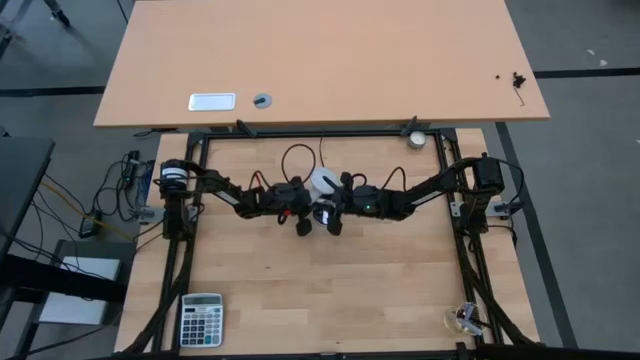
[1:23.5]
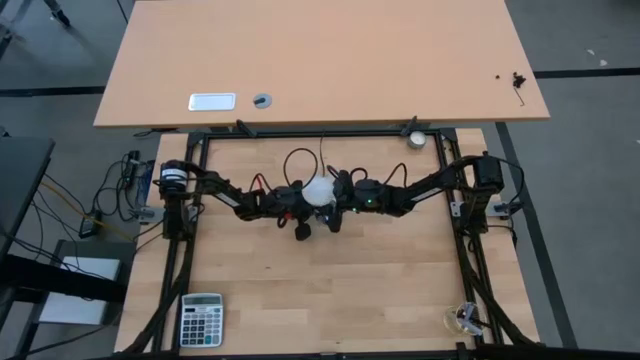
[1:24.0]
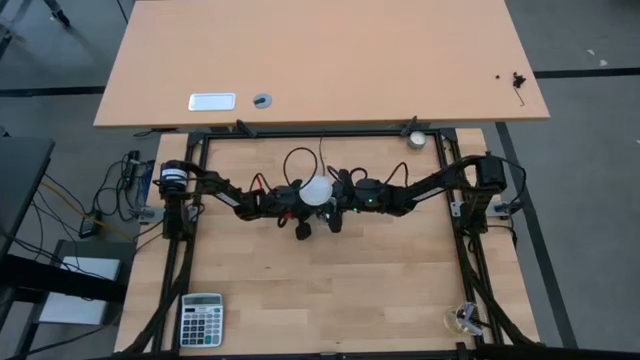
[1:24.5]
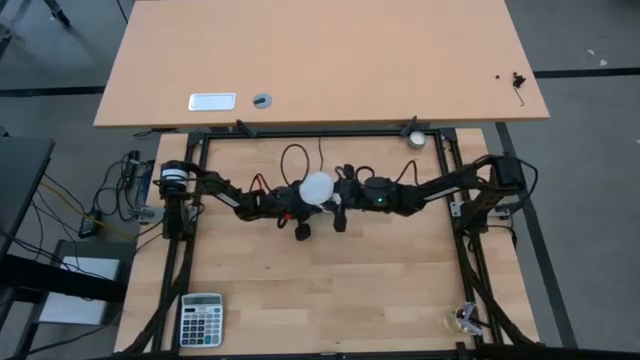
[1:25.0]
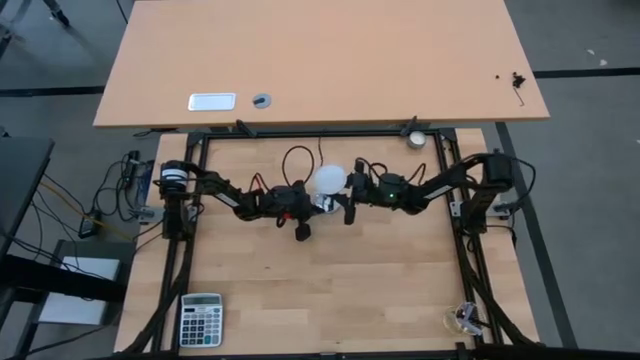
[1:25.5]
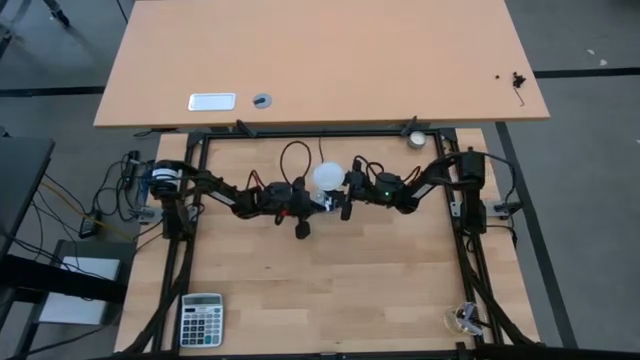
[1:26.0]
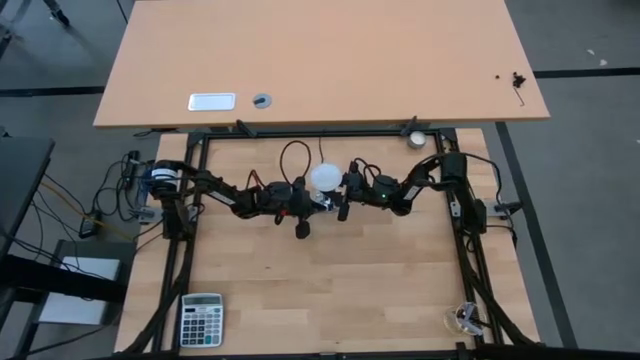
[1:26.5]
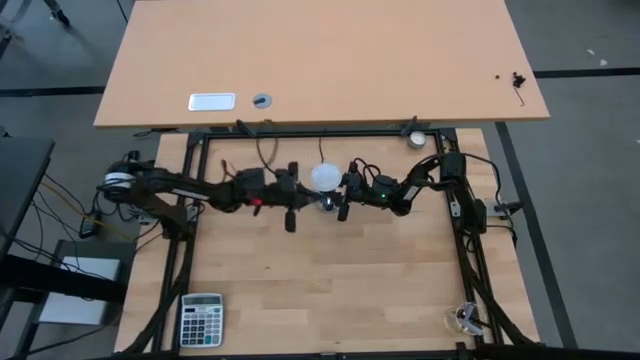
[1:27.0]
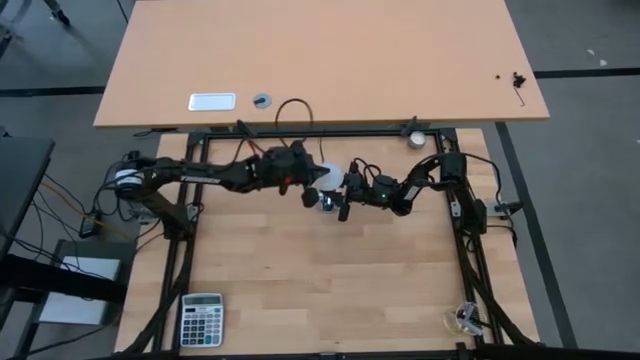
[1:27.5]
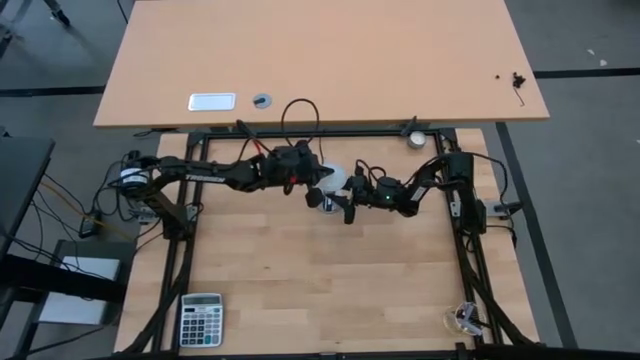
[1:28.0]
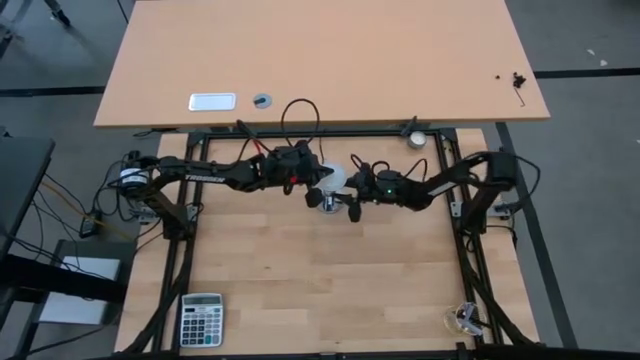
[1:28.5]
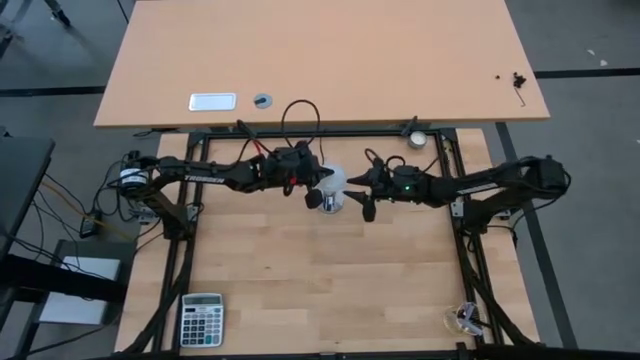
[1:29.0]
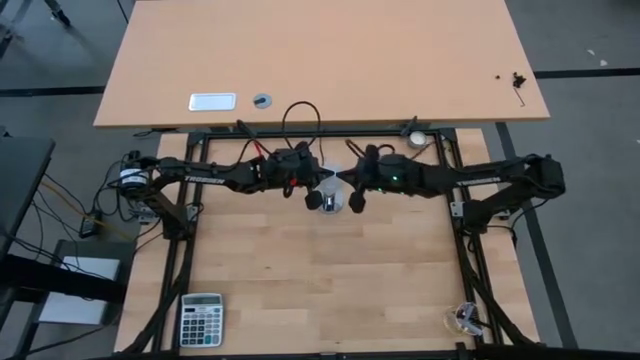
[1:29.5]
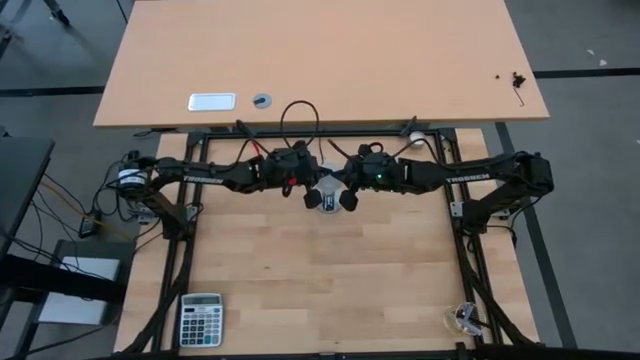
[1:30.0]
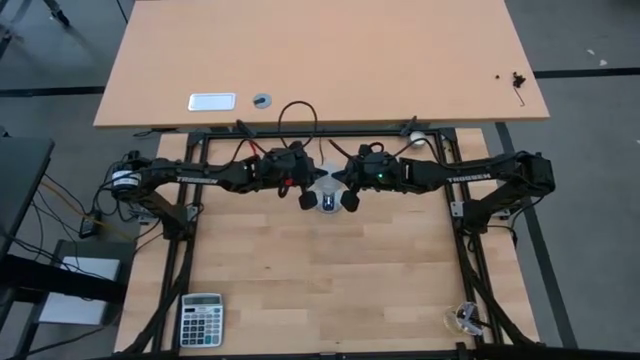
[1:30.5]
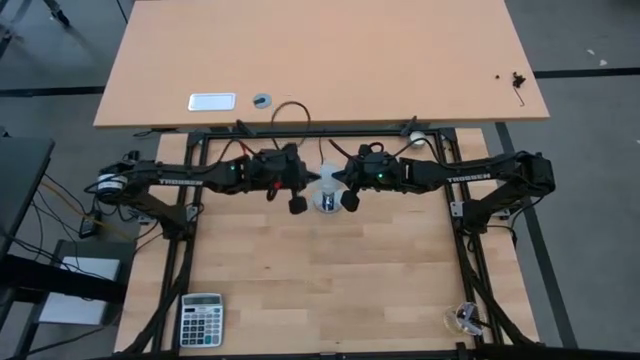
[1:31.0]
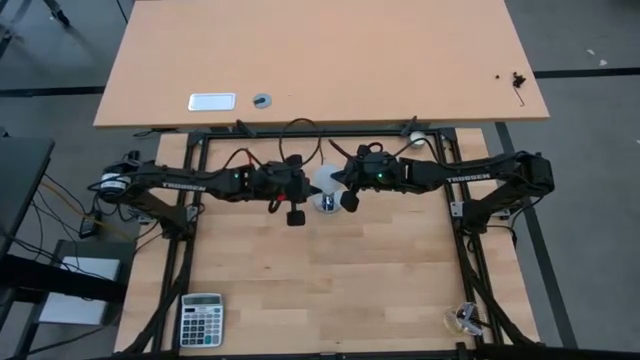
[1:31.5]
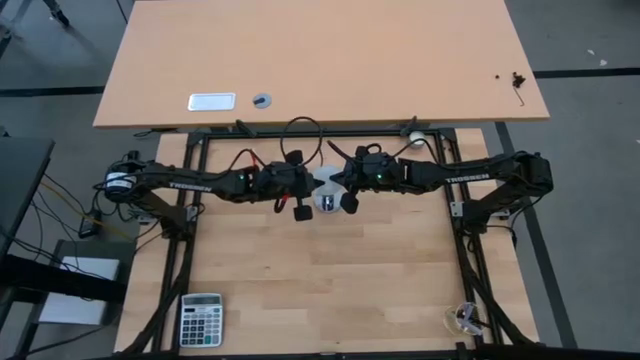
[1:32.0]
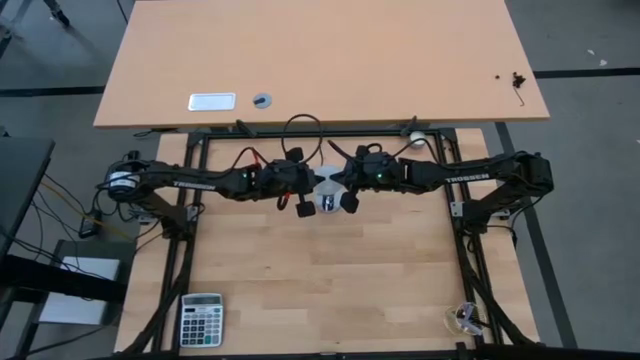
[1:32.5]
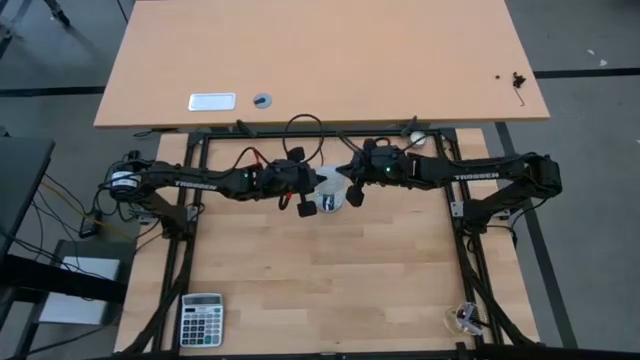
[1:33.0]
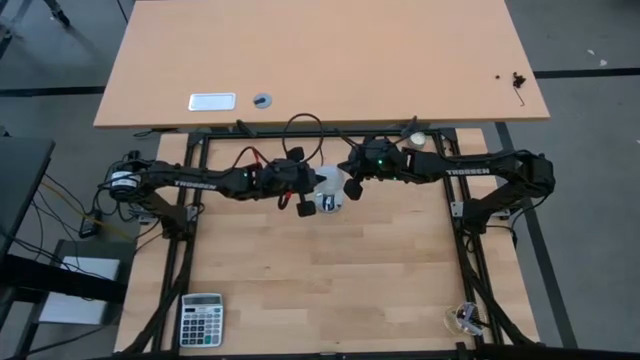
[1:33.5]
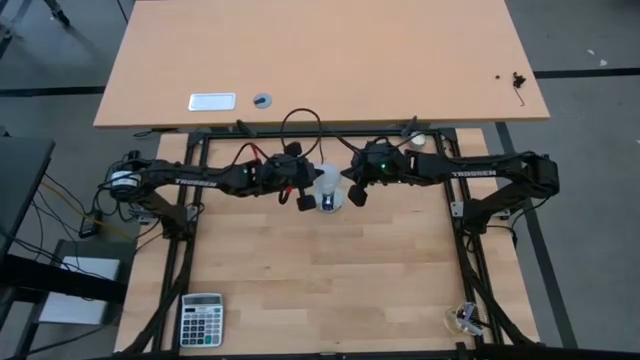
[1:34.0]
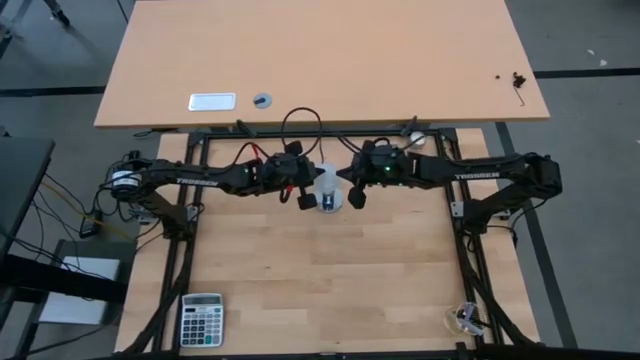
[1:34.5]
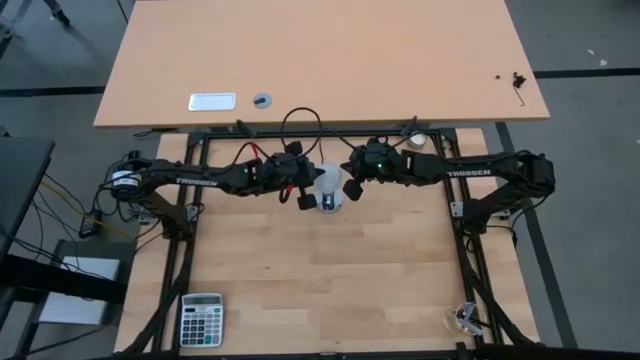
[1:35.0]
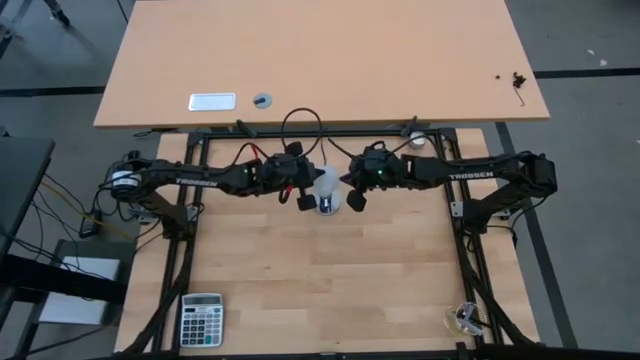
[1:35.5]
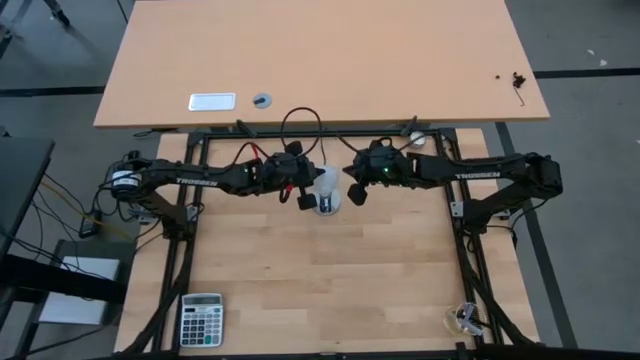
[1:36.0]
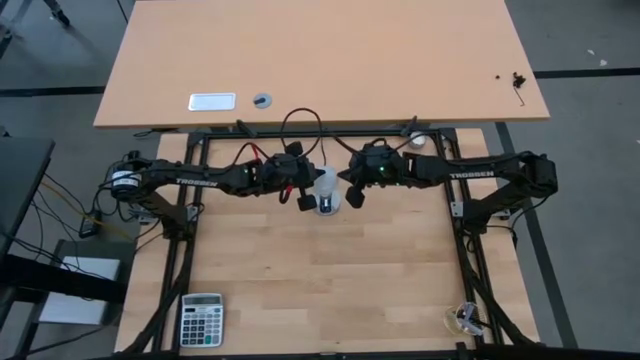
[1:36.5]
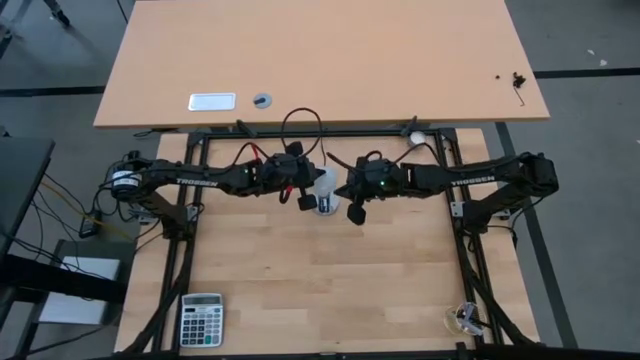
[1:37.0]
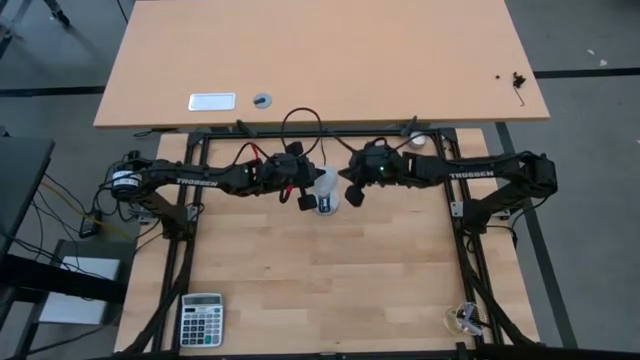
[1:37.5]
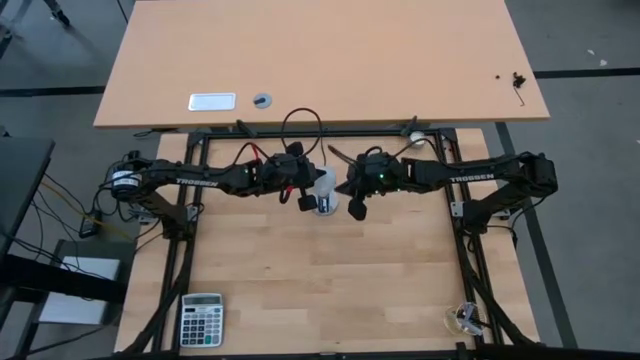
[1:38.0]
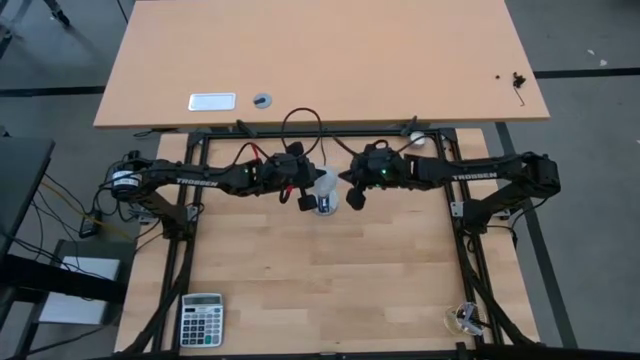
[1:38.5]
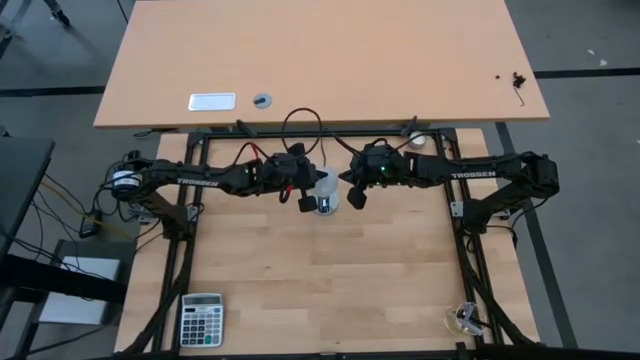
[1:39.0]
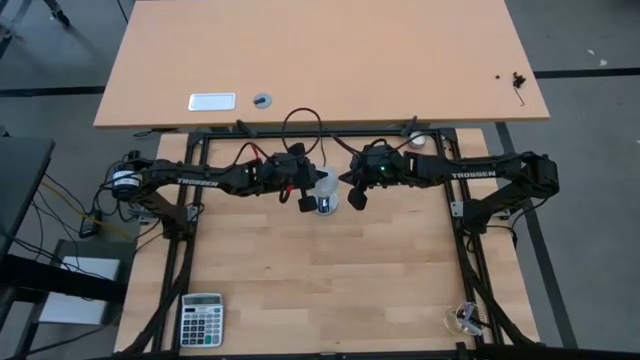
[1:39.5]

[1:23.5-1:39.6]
Task: Screw lightbulb
Insert the lightbulb into the silver lamp socket

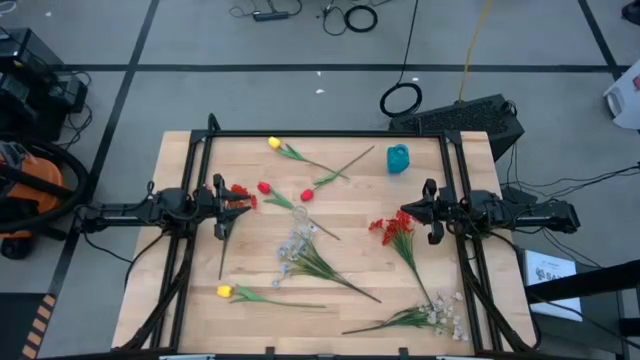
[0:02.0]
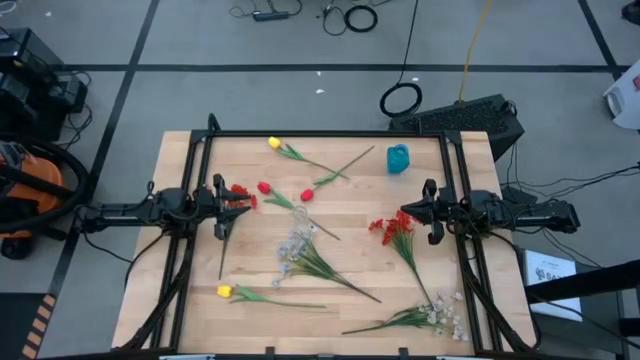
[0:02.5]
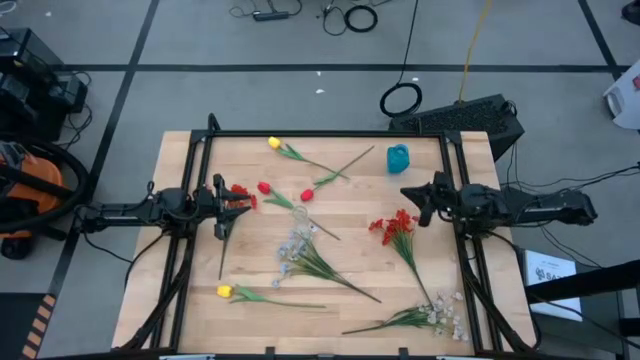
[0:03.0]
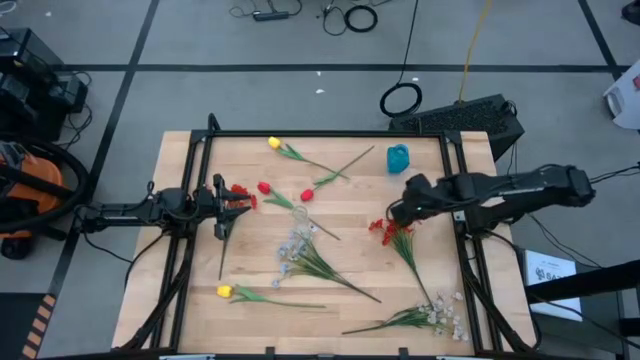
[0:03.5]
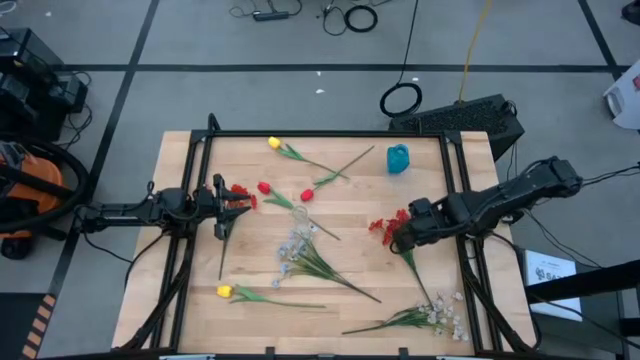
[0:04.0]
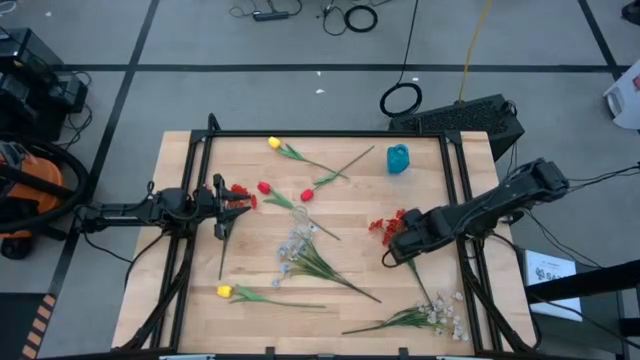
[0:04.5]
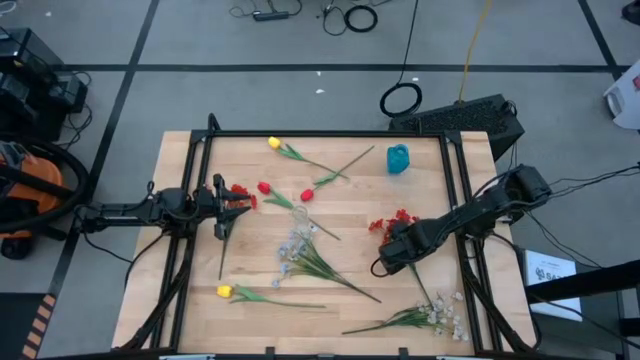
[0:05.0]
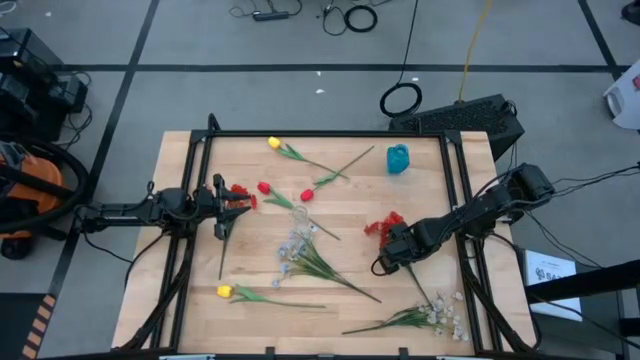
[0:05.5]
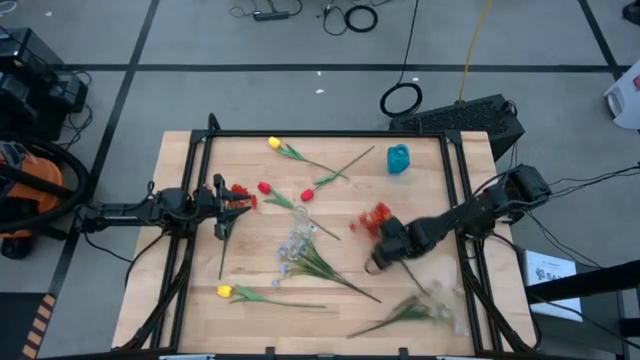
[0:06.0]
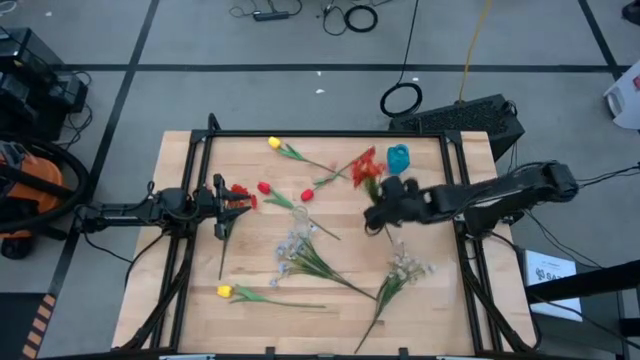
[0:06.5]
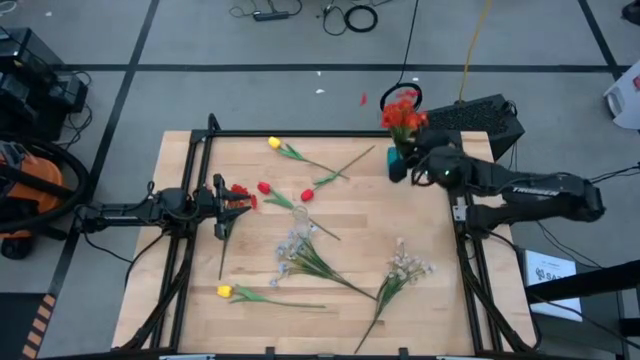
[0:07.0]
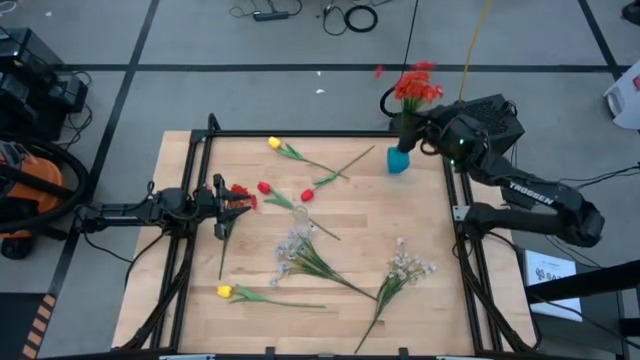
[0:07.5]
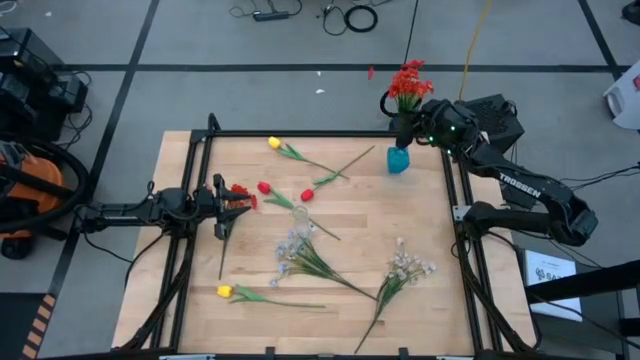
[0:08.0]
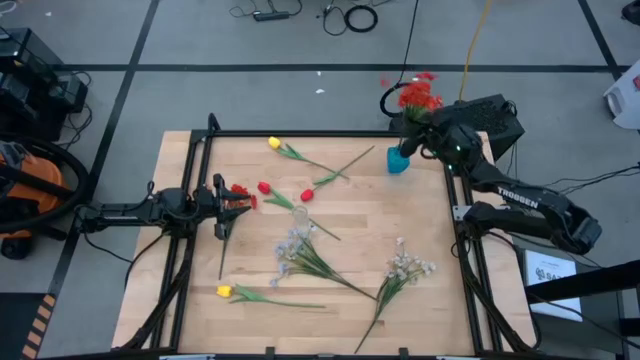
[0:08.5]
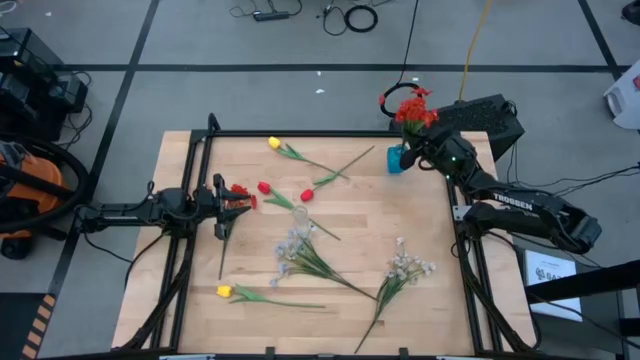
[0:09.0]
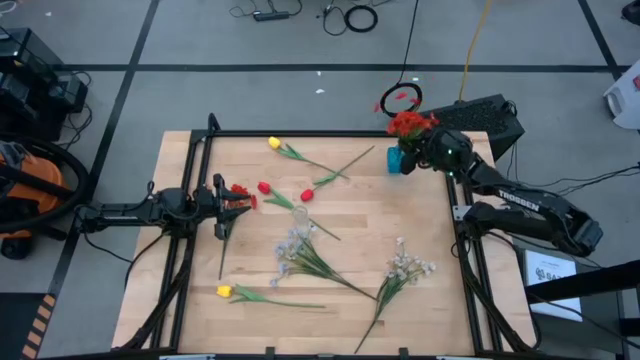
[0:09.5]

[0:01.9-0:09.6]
Task: Sort flowers into vase by color
Put the right orange flowers into the blue flower vase
